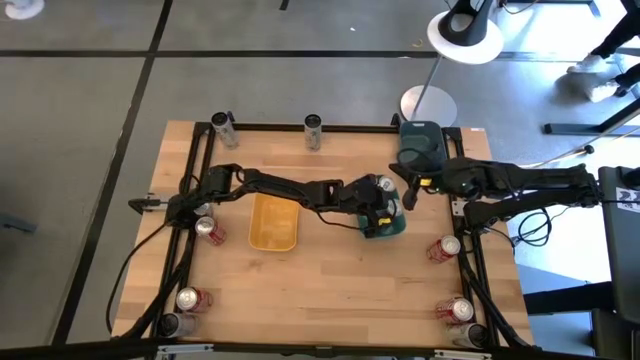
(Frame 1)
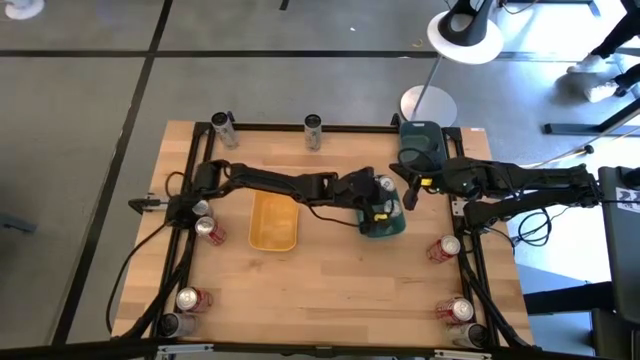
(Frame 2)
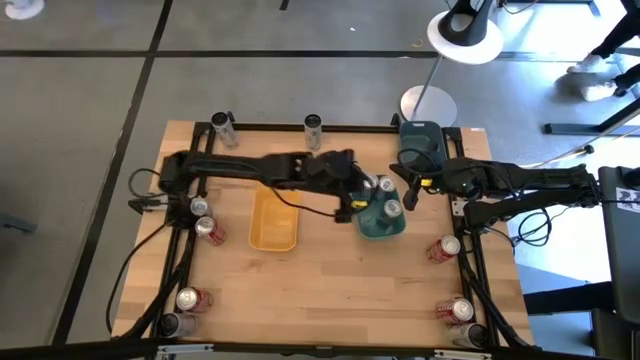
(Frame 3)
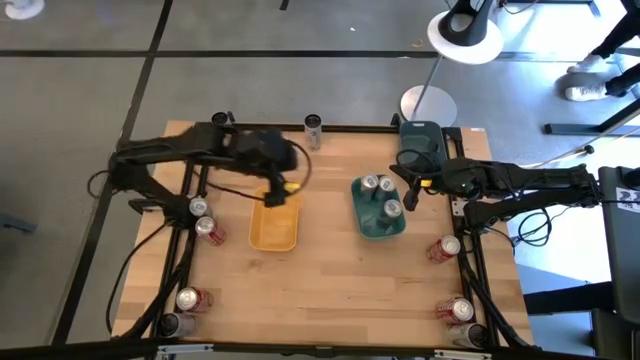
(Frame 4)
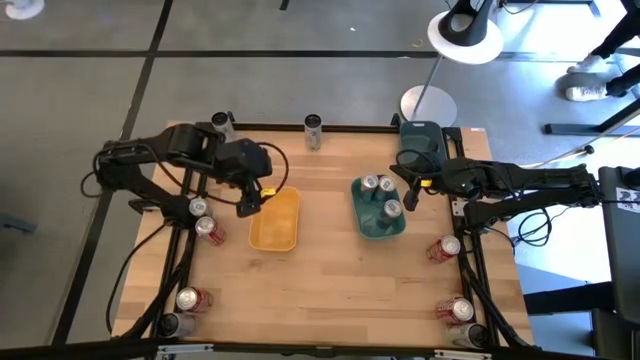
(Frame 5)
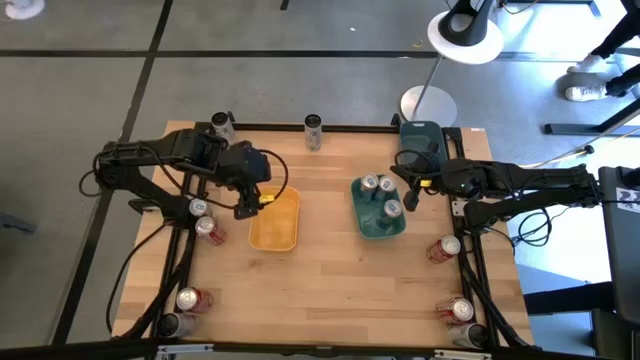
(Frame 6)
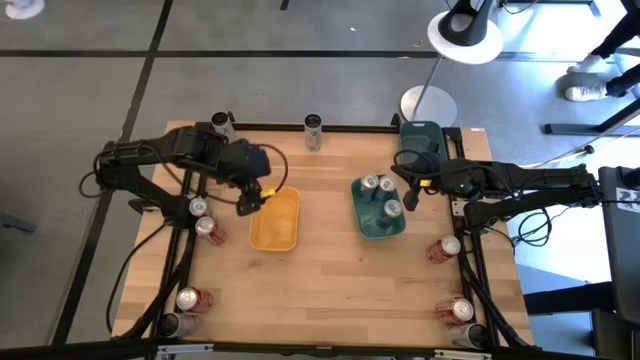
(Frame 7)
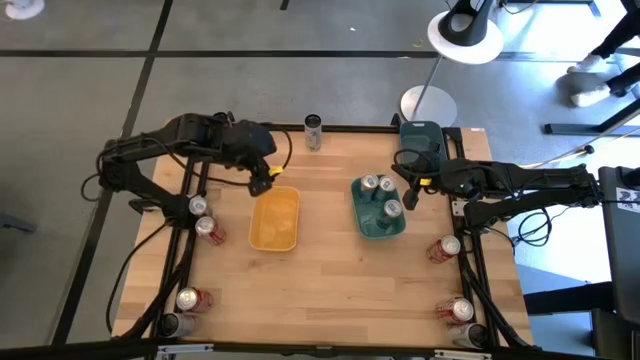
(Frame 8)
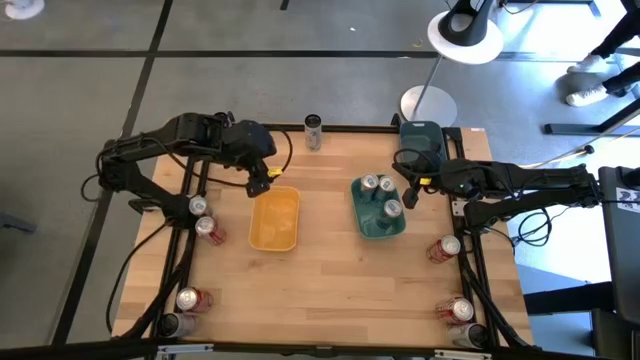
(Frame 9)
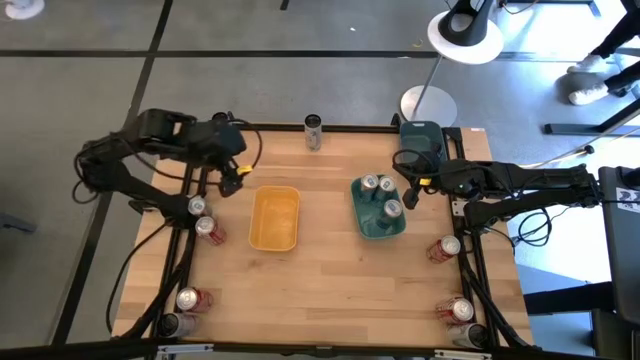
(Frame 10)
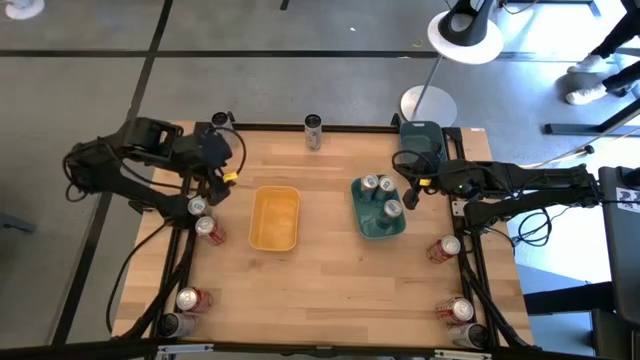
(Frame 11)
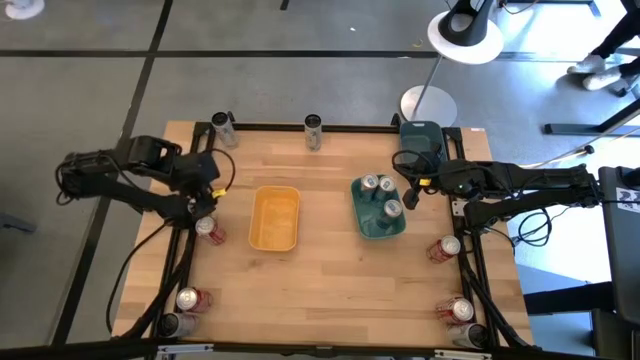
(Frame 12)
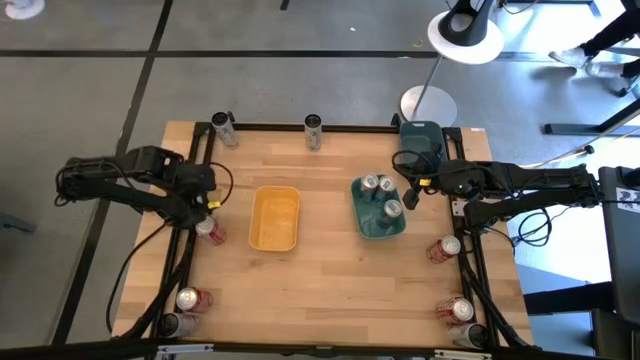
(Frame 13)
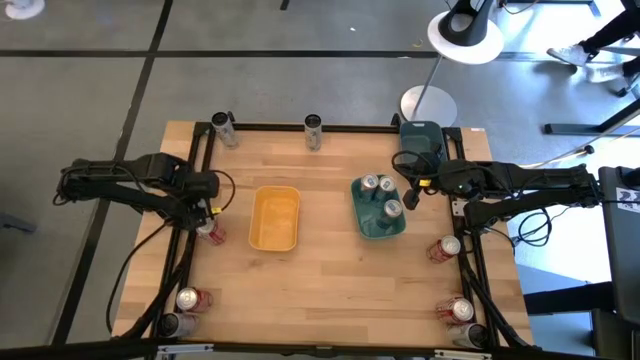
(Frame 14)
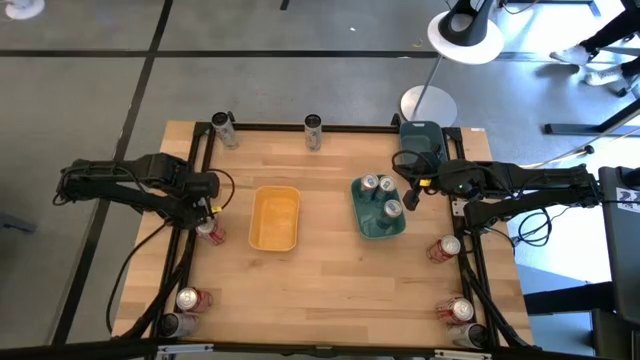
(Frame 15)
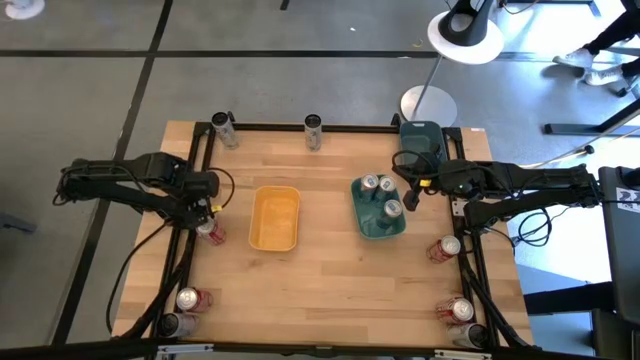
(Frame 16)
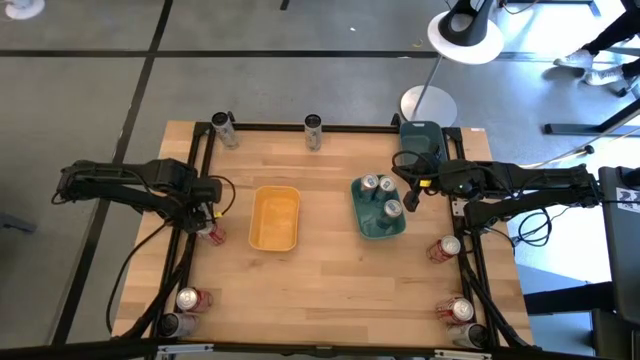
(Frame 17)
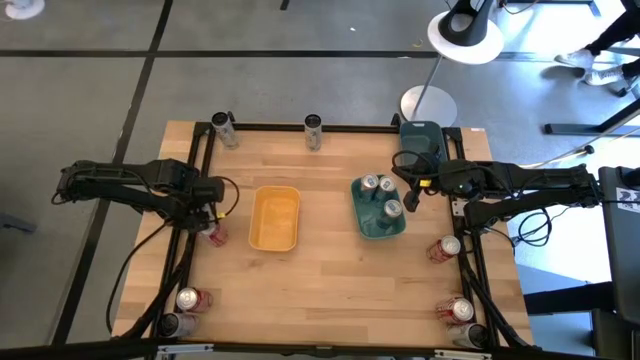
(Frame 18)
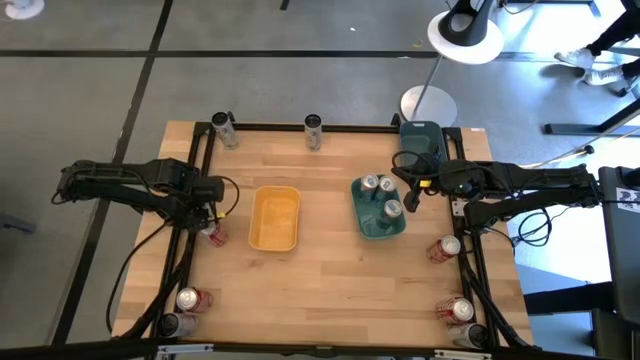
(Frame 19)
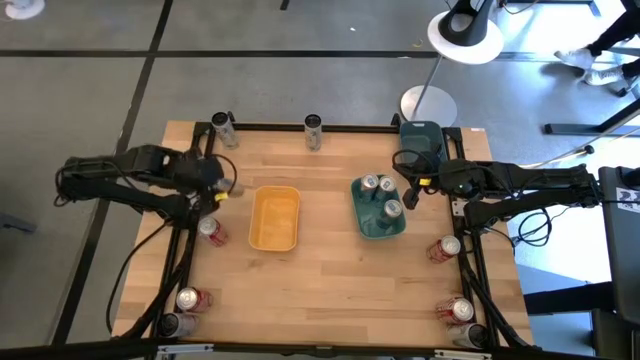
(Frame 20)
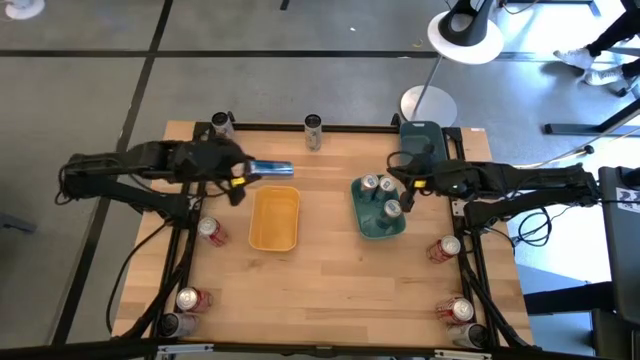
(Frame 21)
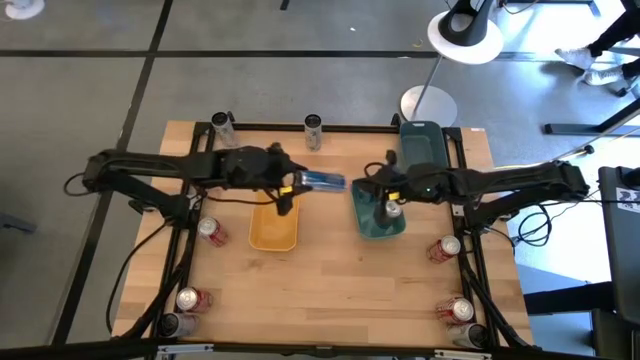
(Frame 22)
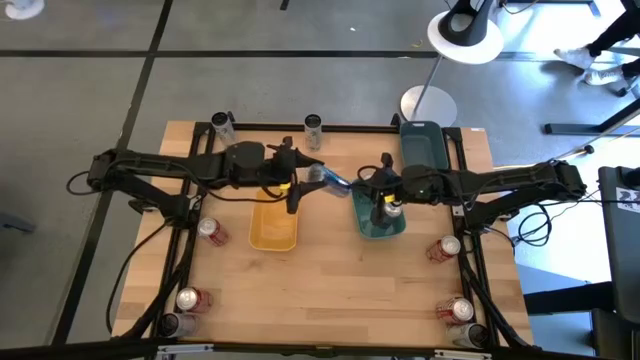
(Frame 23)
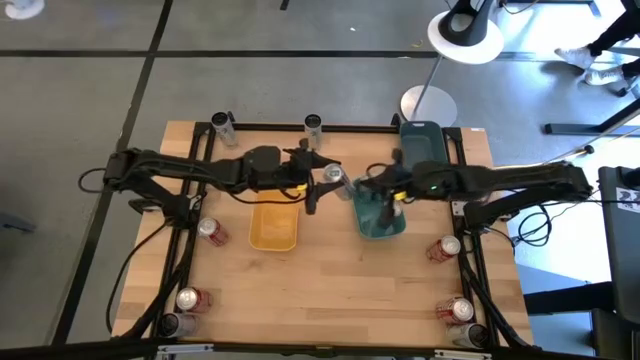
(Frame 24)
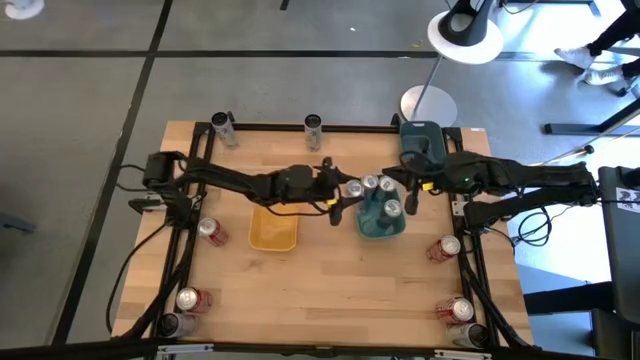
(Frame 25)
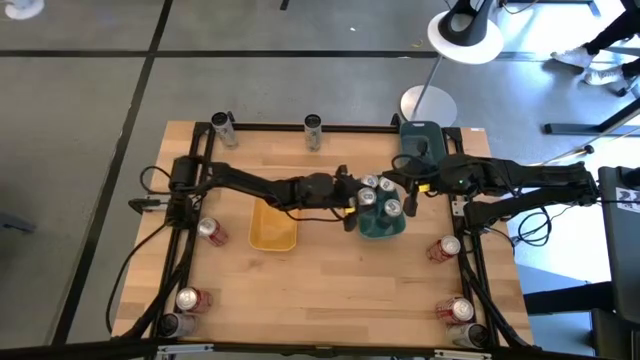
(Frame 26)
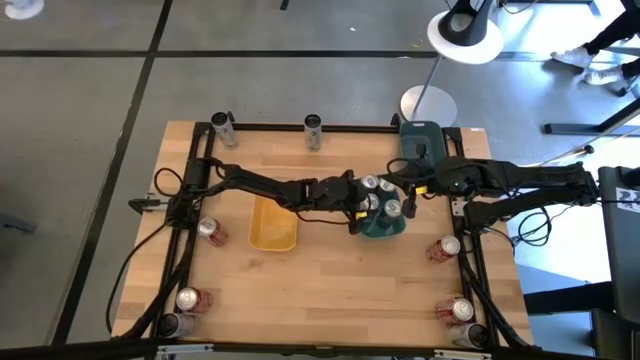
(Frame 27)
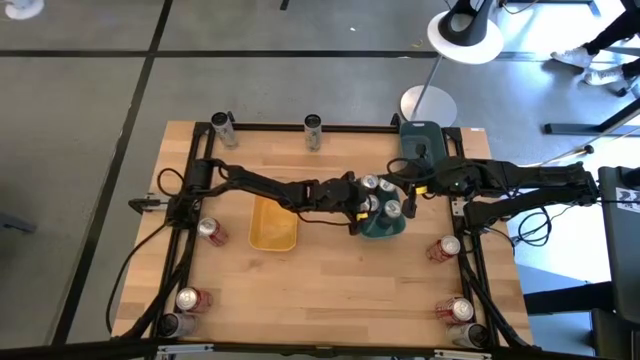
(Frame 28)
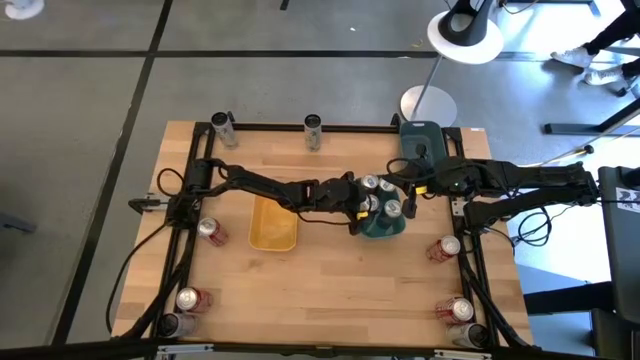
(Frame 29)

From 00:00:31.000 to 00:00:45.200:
Task: Sort soda cans
Put the blue soda can into the green bin

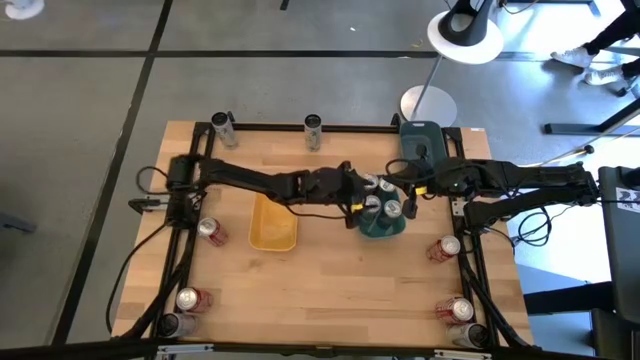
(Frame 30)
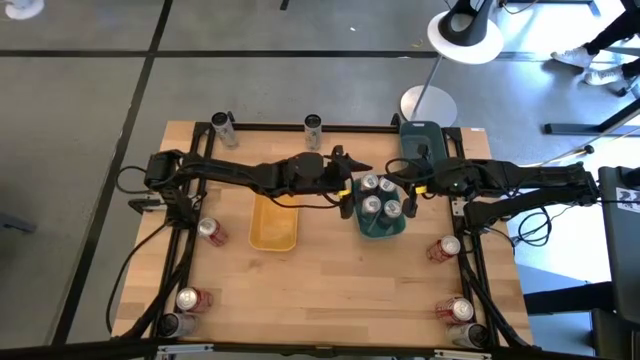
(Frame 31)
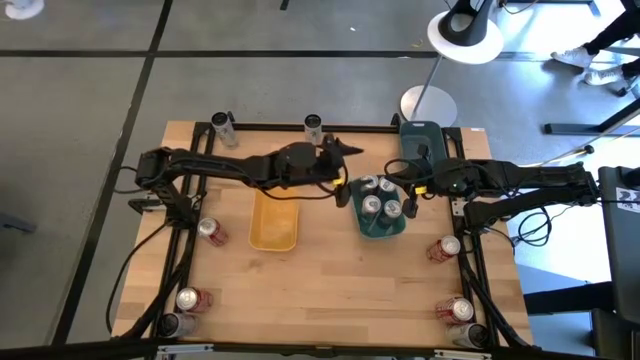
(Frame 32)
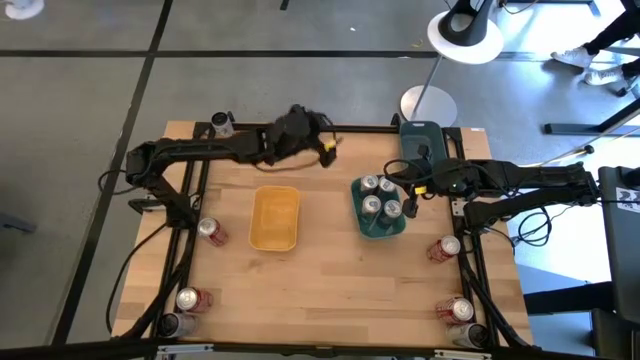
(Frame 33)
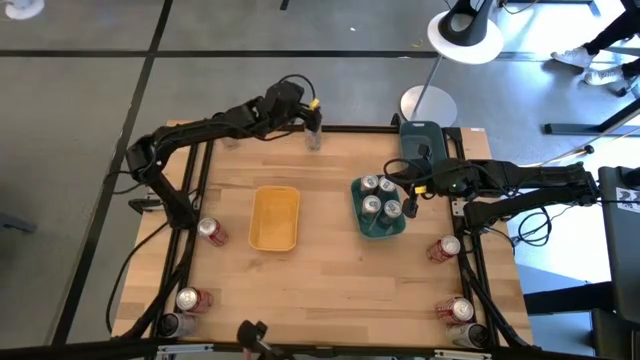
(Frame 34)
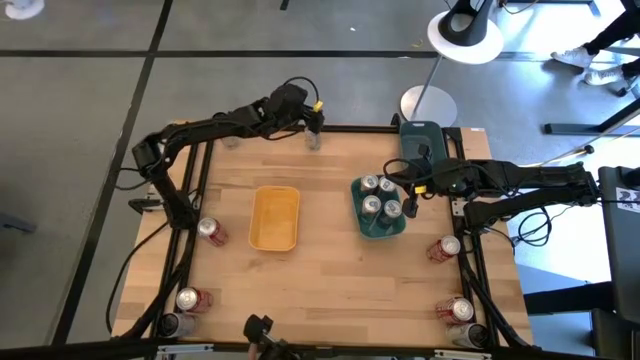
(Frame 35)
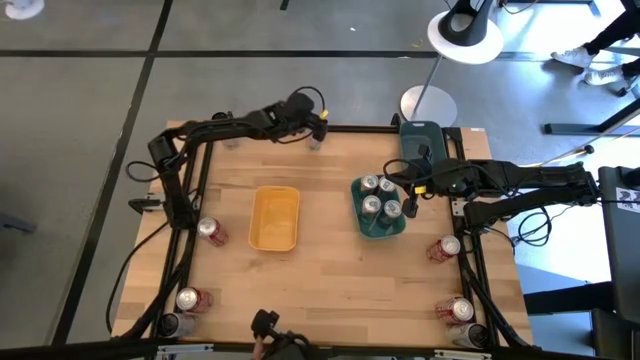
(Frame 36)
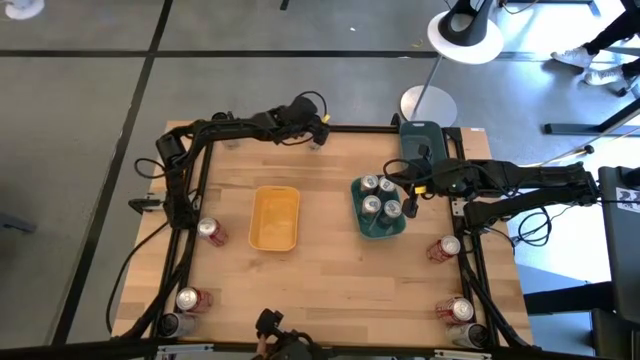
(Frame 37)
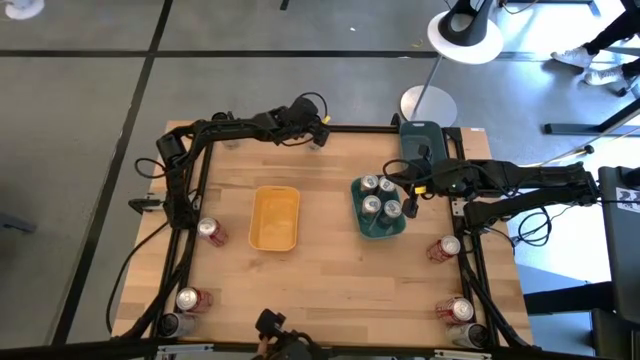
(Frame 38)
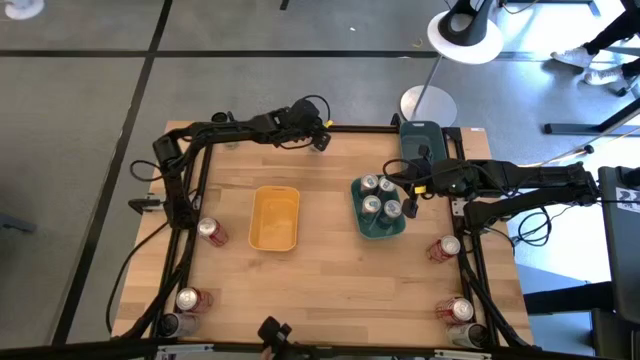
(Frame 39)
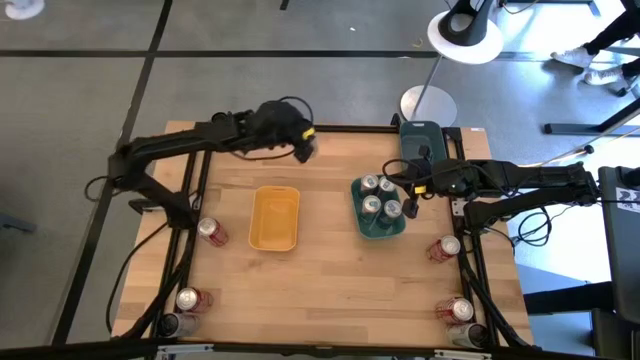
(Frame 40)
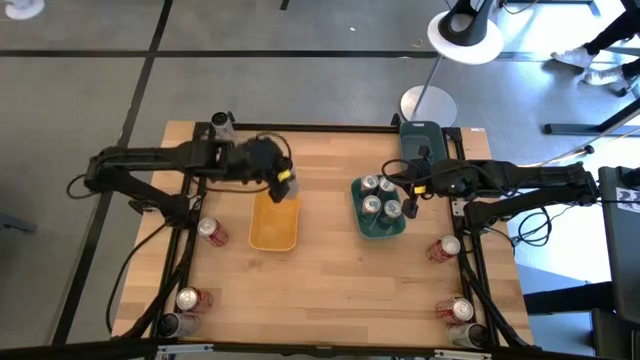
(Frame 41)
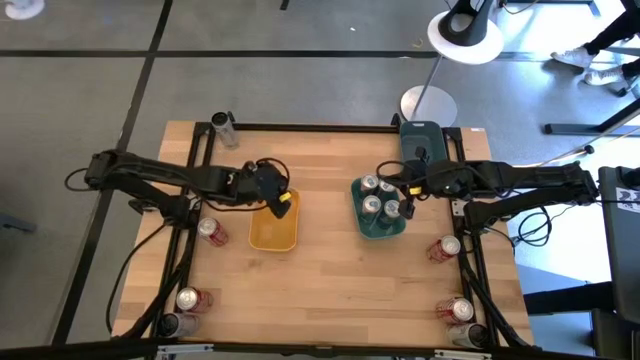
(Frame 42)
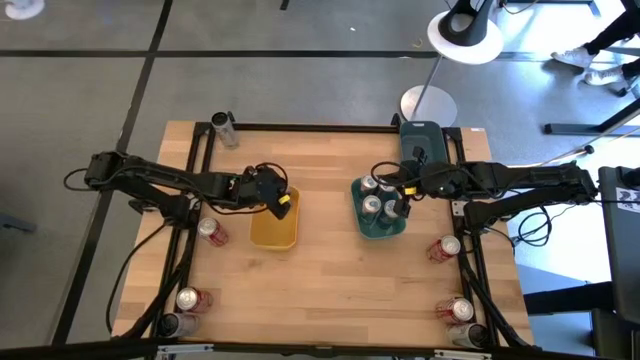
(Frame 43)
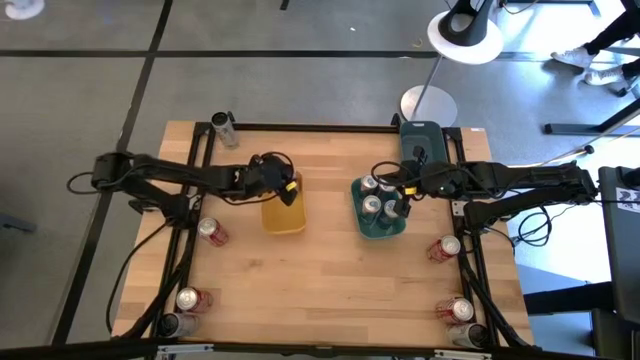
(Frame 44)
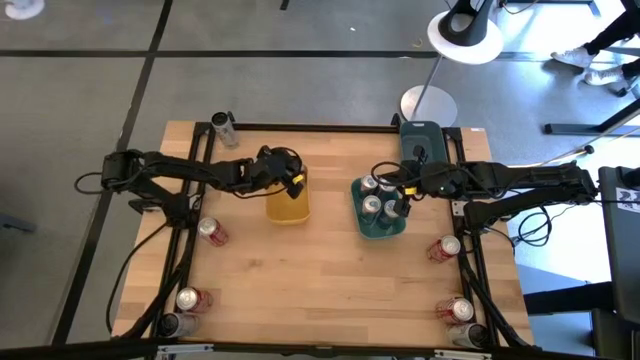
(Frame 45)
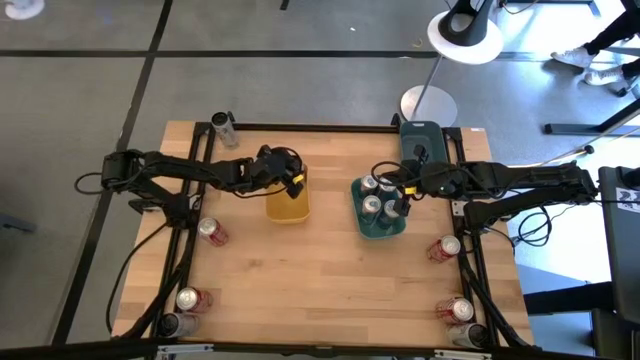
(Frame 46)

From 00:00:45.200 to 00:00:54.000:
Put the top right white-pink soda can into the yellow bin
